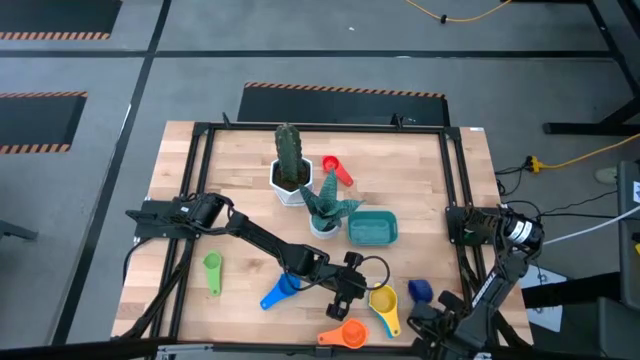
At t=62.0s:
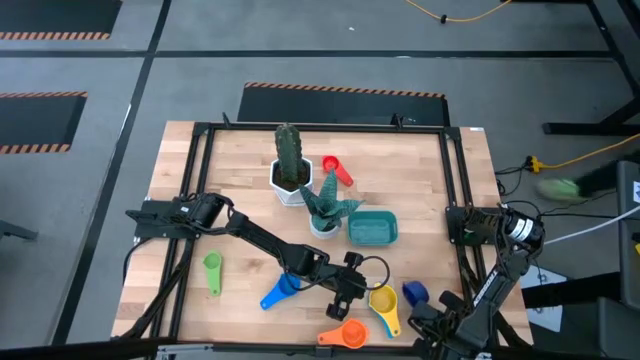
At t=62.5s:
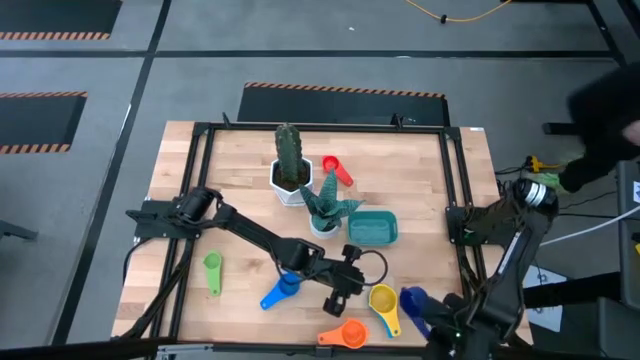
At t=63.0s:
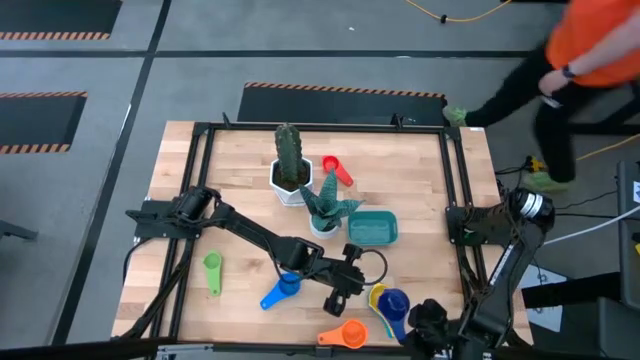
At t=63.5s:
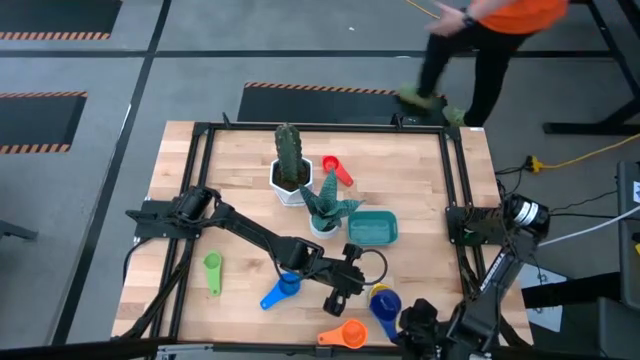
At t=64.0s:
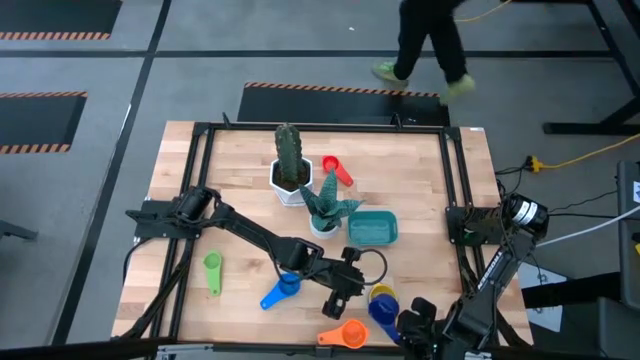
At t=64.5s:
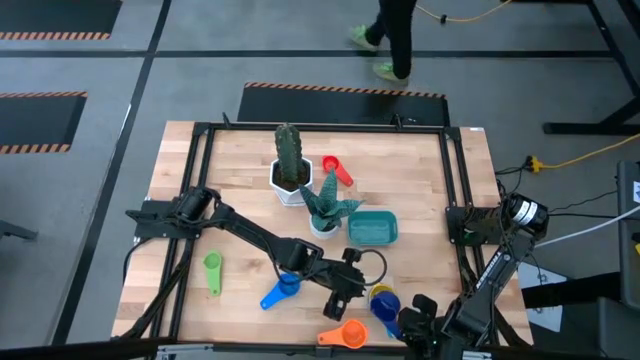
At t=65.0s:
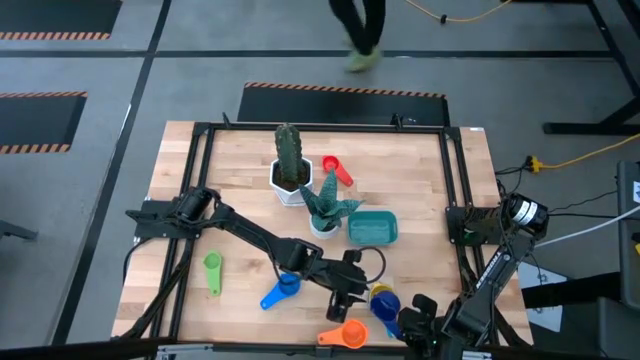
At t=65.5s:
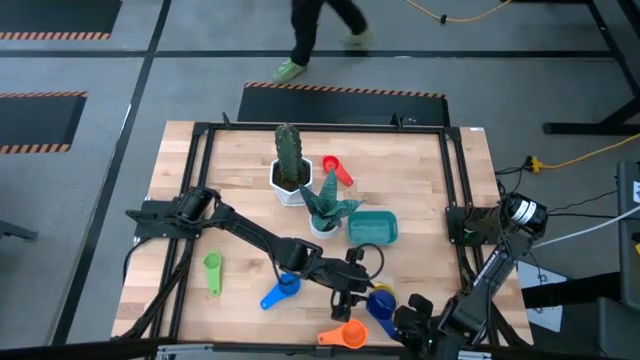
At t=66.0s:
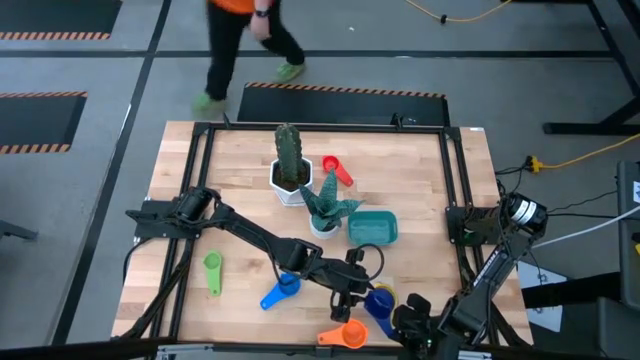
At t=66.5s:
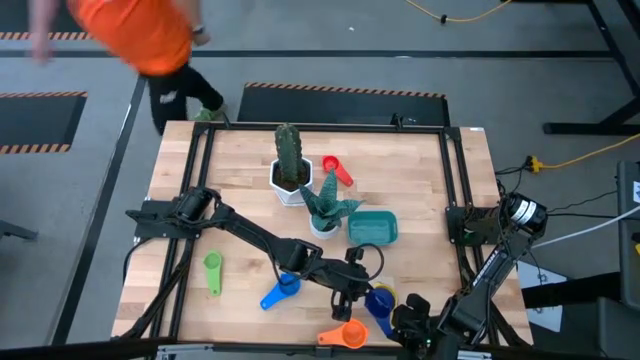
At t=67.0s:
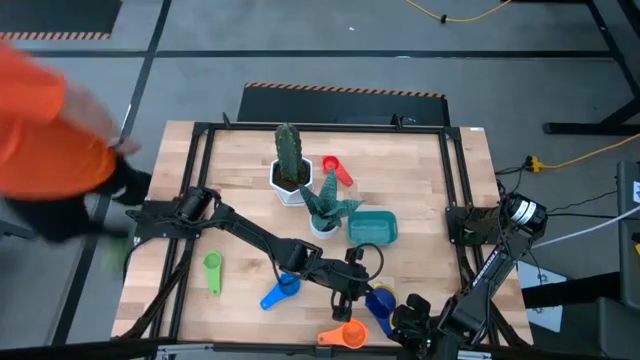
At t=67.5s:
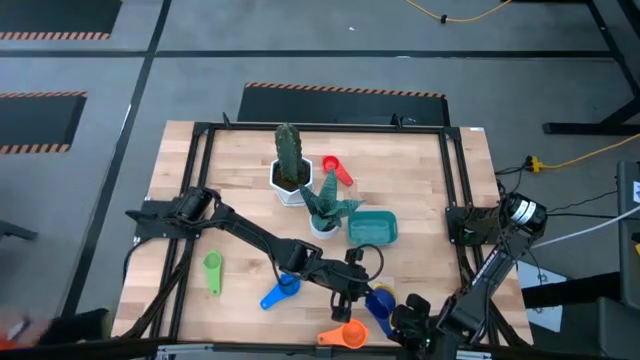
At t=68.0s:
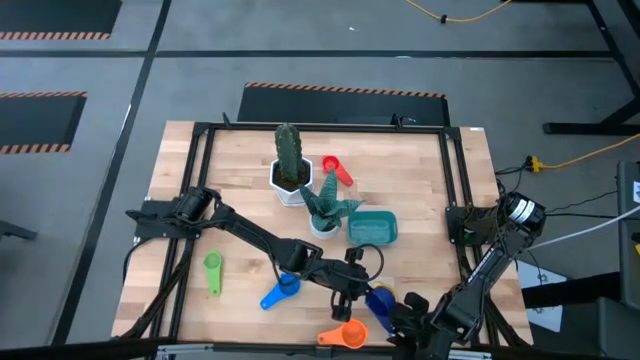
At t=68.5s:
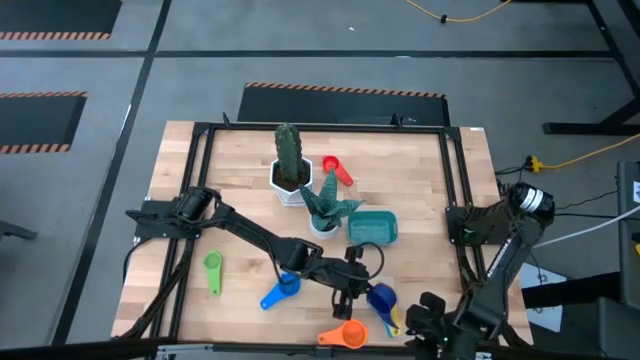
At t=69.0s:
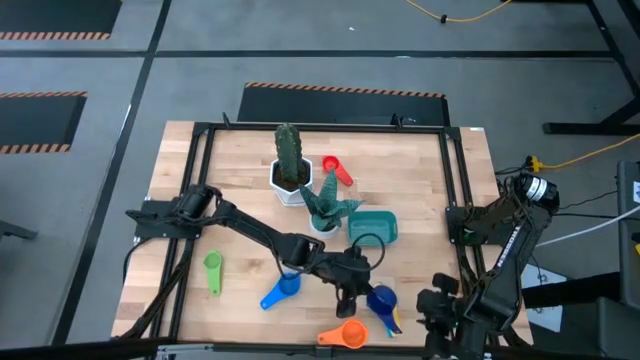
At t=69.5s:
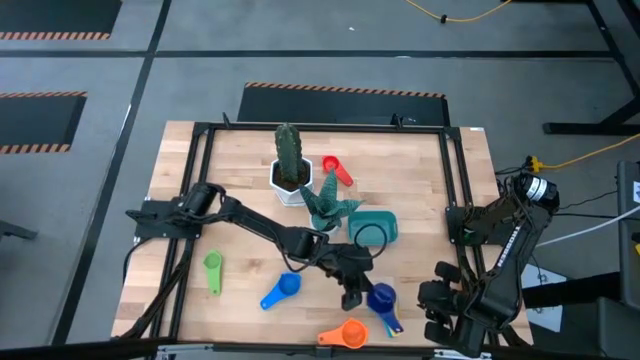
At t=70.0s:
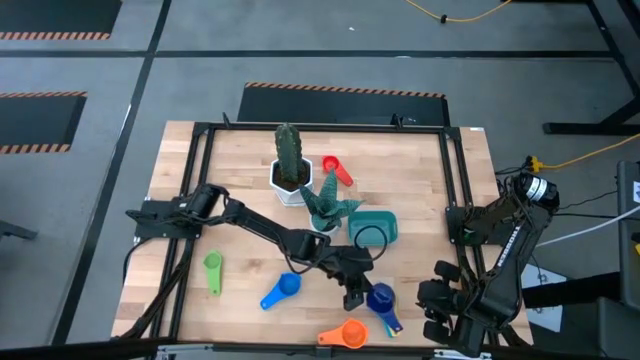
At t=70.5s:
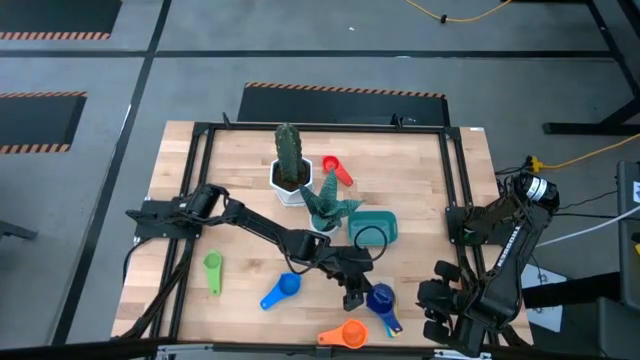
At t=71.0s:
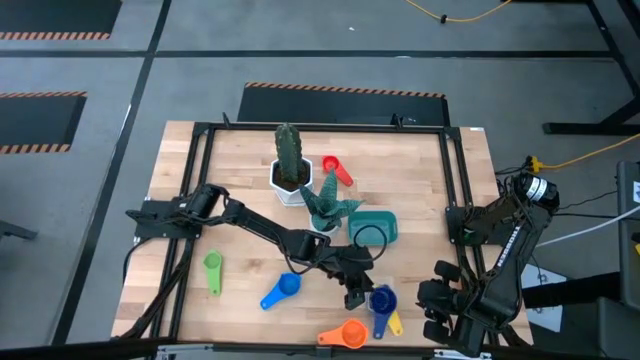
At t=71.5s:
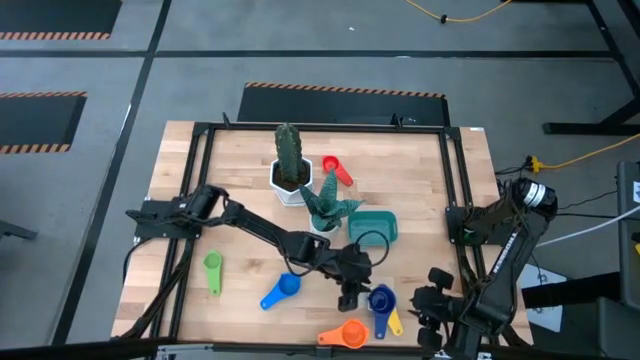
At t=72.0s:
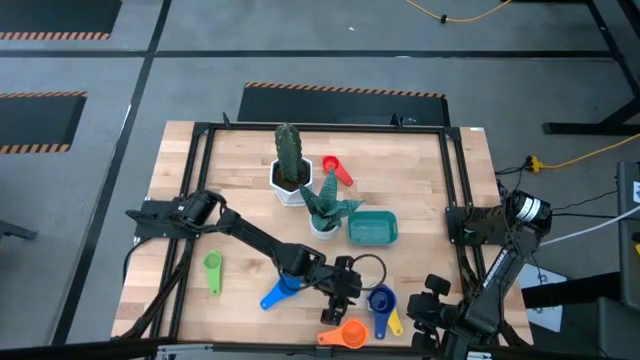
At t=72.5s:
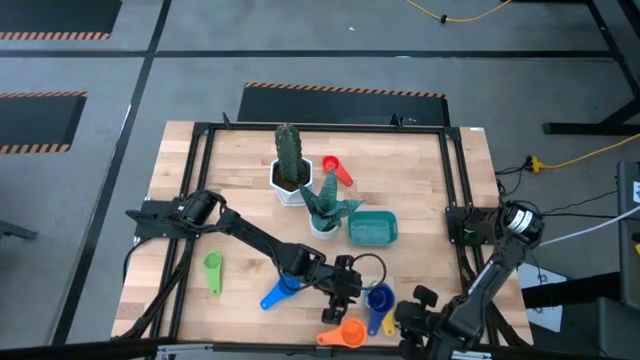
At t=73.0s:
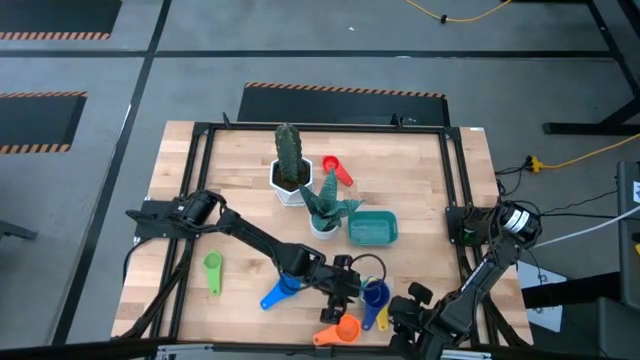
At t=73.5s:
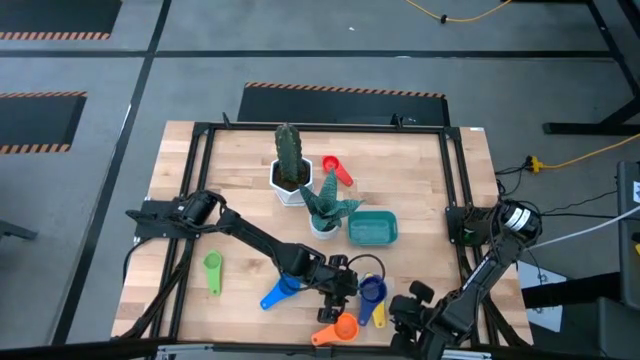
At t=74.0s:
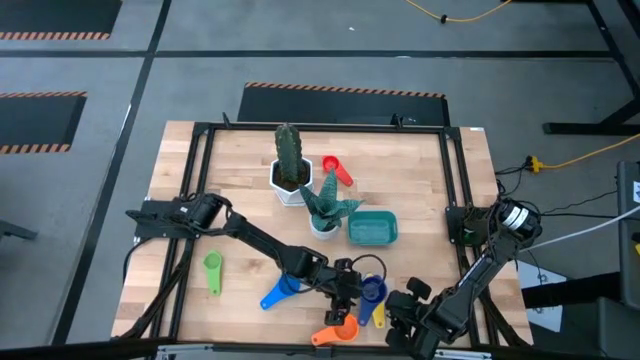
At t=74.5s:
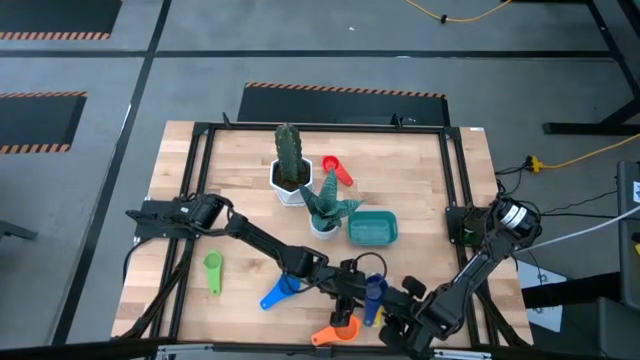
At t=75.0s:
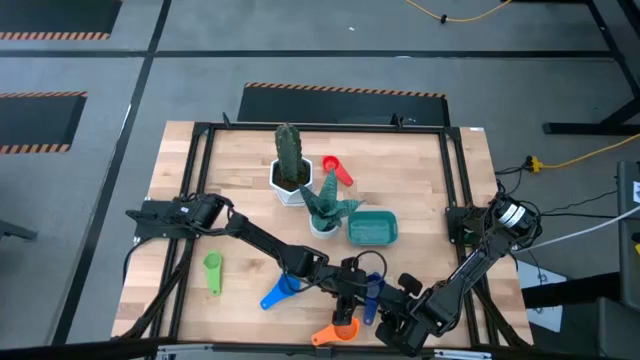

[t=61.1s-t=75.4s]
Task: Nest measuring cups in basket
Stack the dark blue measuring cup on top of the yellow measuring cup

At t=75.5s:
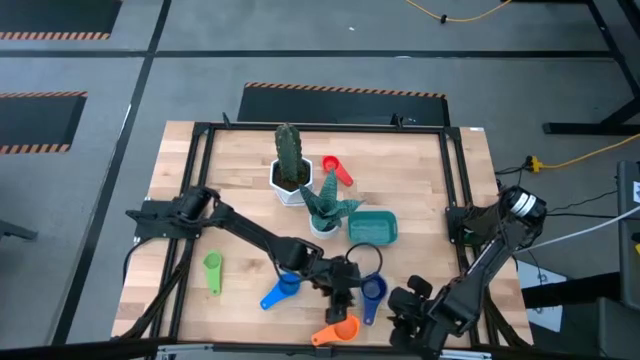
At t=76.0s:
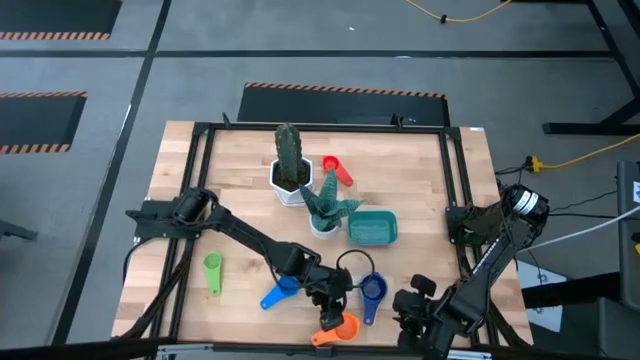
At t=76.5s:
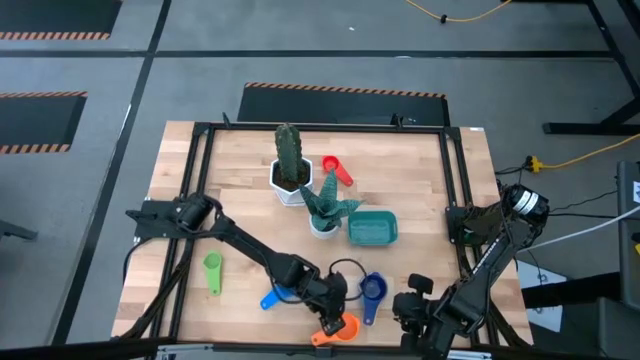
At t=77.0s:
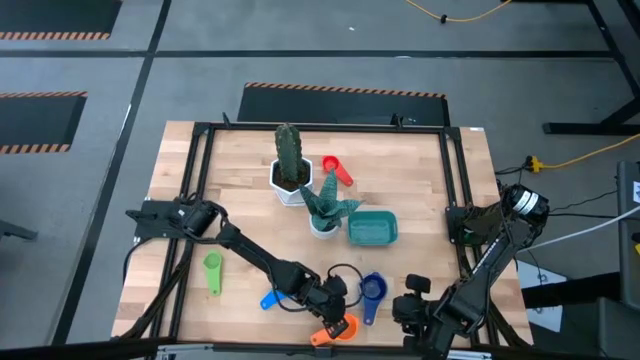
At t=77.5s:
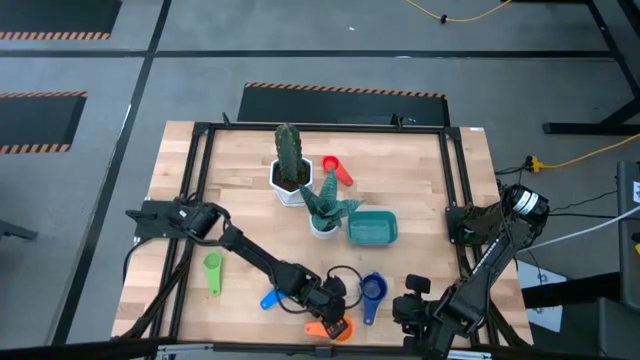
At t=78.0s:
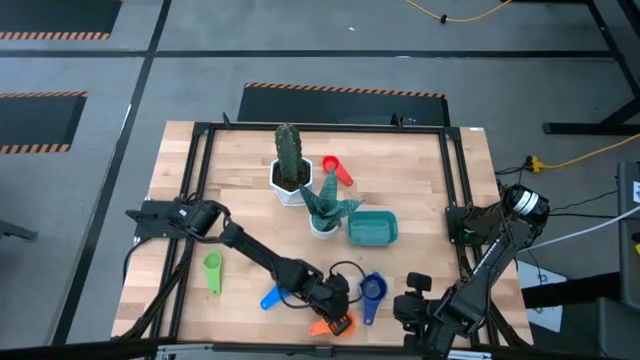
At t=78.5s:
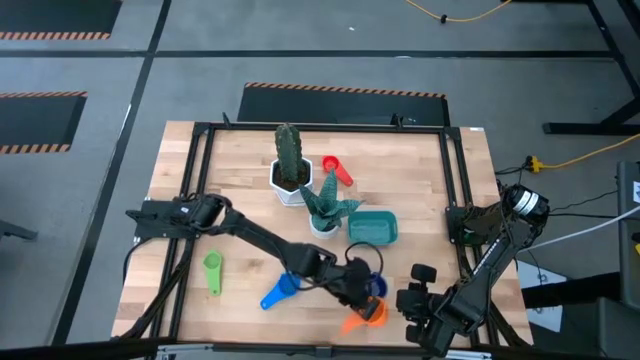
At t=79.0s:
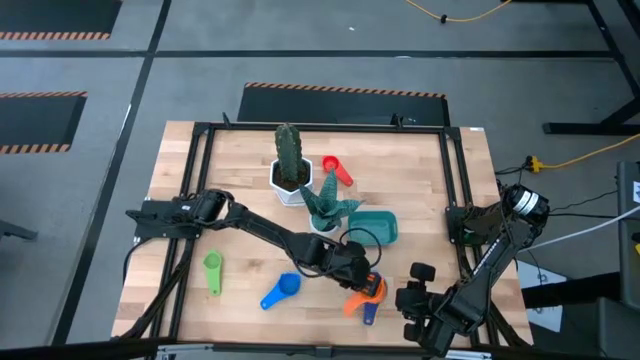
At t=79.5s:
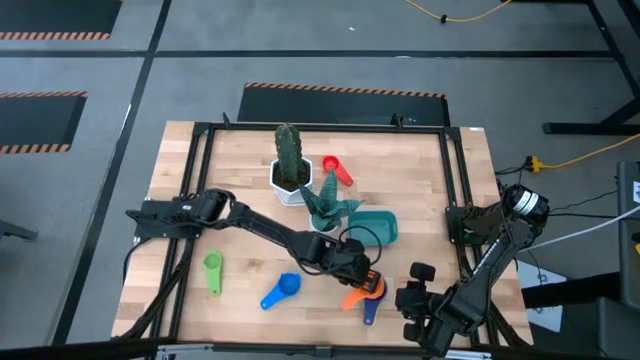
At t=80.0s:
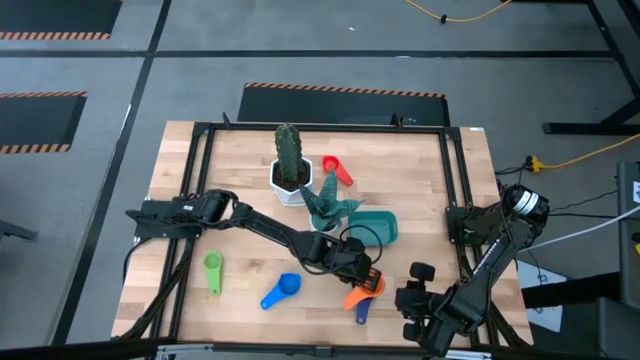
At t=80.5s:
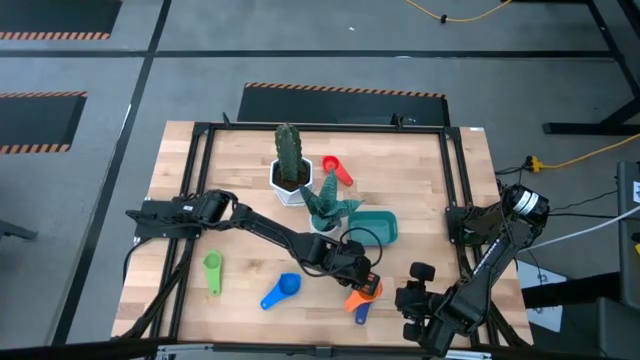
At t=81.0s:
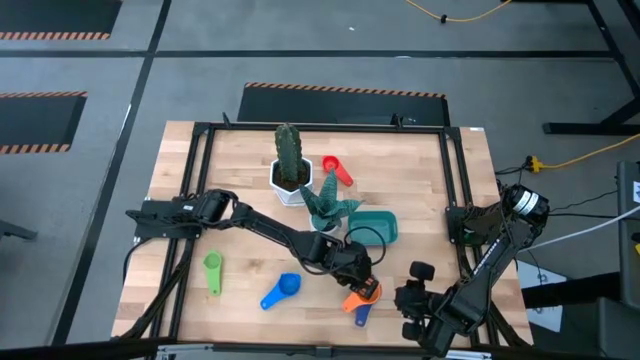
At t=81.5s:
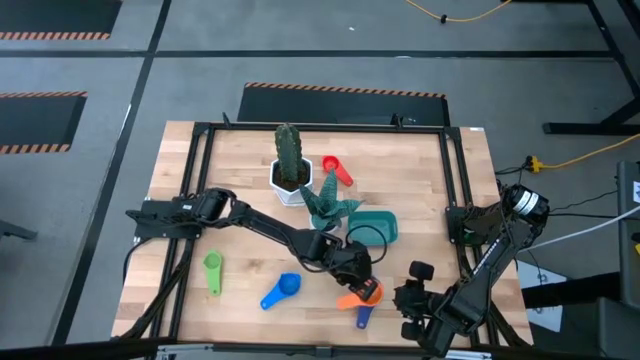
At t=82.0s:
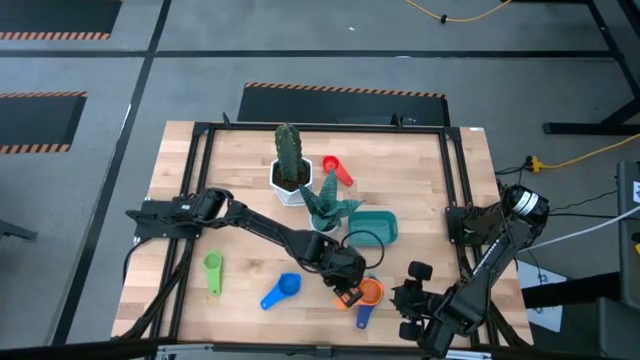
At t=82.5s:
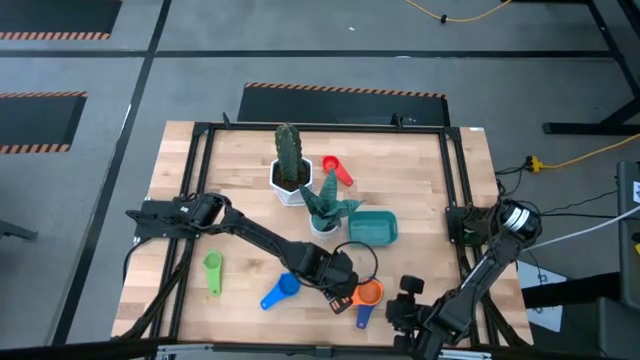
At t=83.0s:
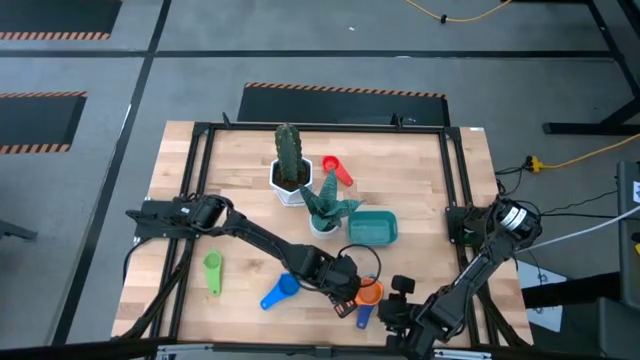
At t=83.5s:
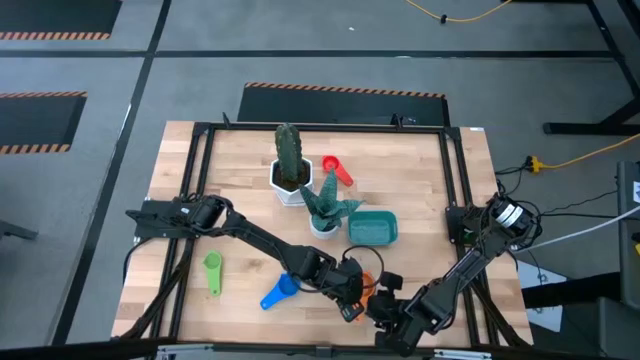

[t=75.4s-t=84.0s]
Stack the orange measuring cup on top of the dark blue measuring cup
